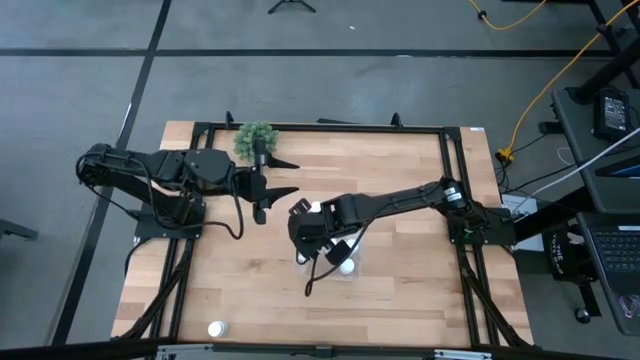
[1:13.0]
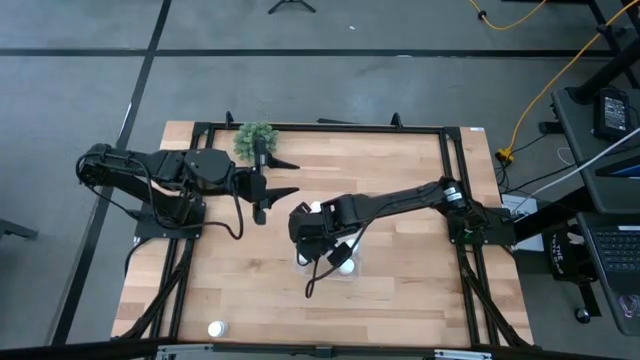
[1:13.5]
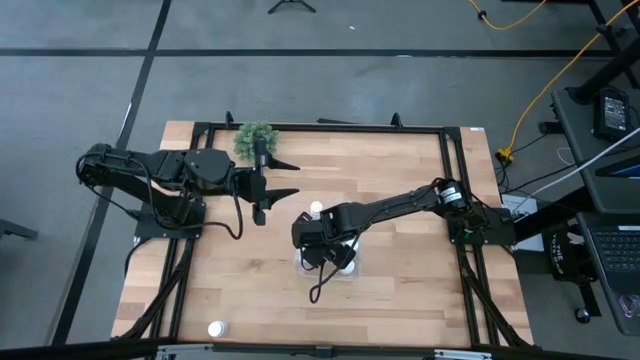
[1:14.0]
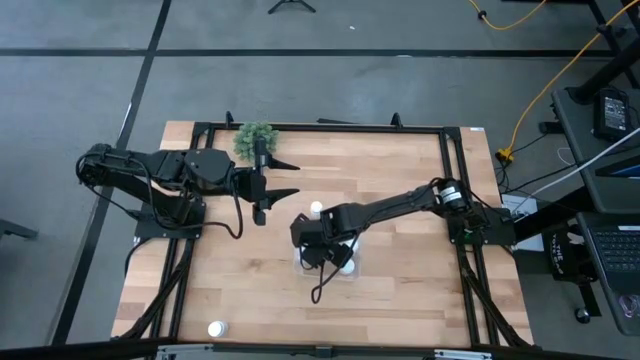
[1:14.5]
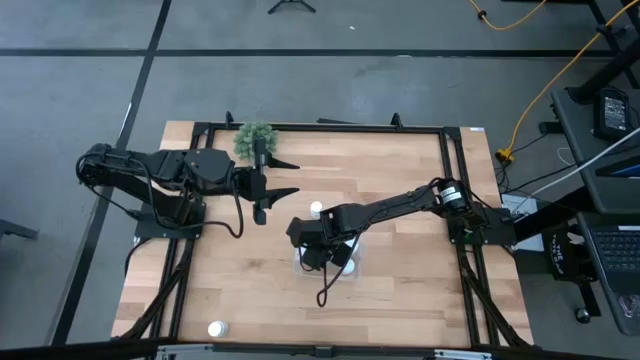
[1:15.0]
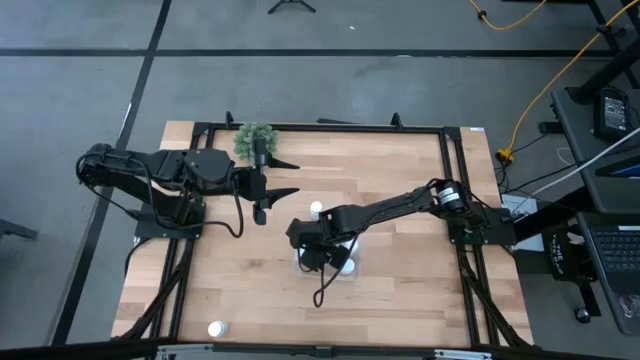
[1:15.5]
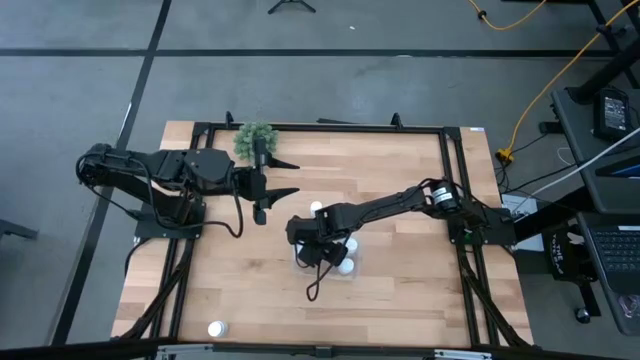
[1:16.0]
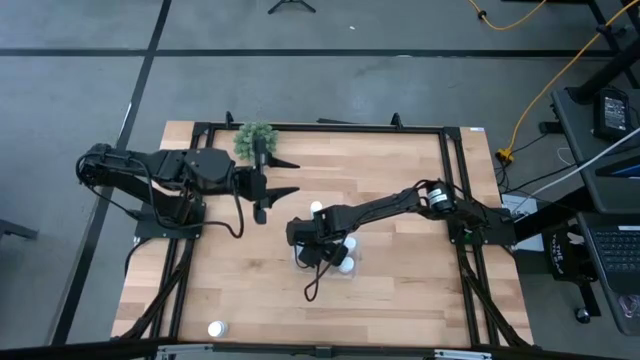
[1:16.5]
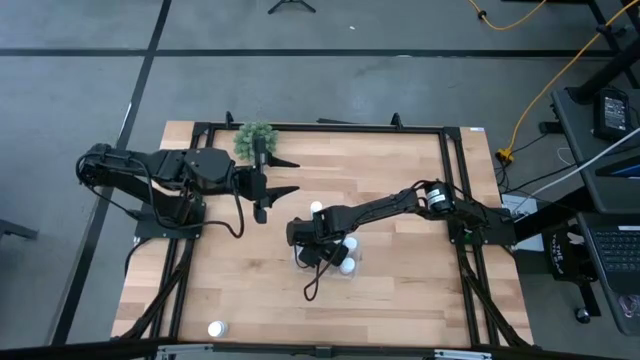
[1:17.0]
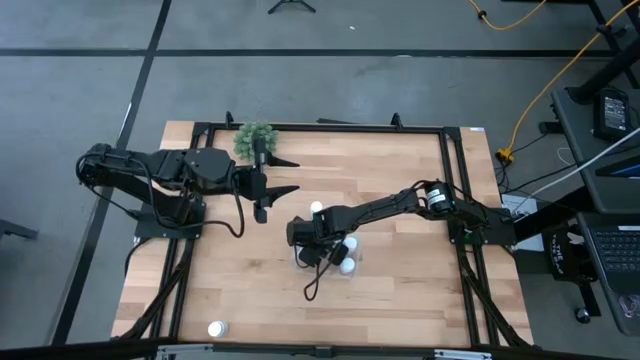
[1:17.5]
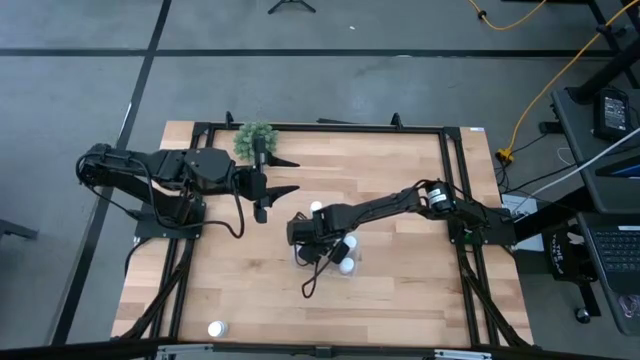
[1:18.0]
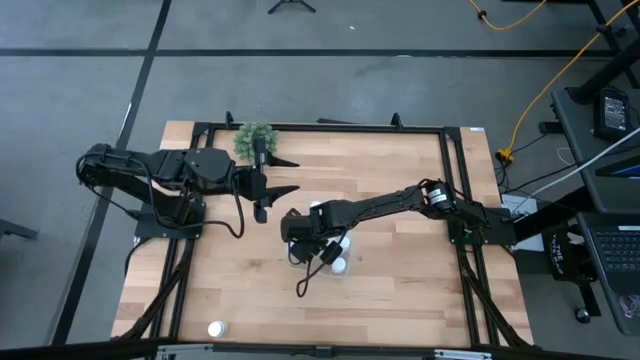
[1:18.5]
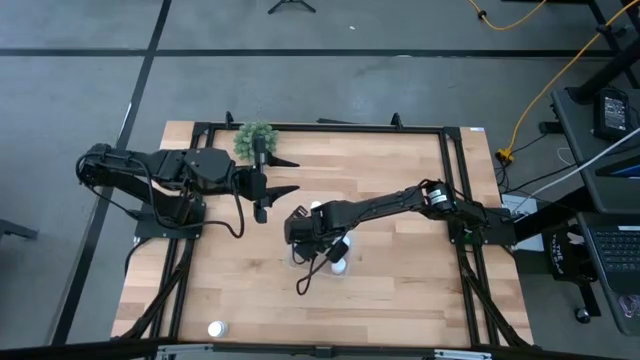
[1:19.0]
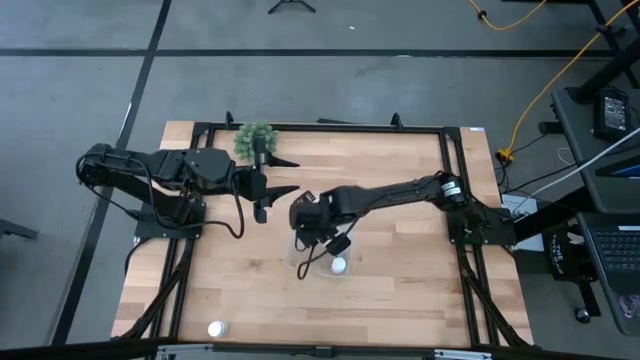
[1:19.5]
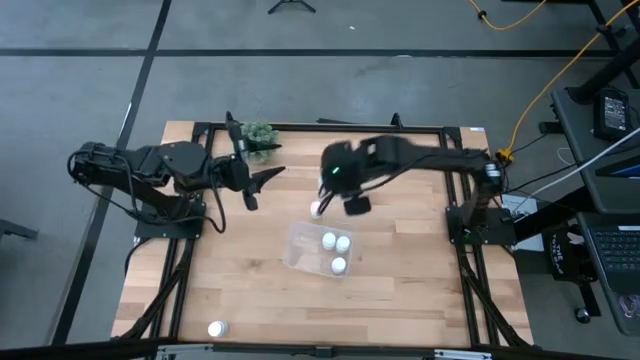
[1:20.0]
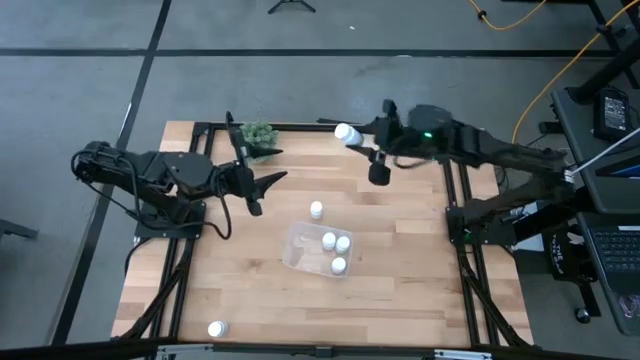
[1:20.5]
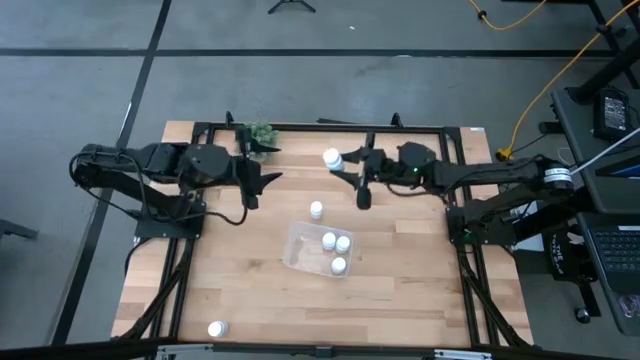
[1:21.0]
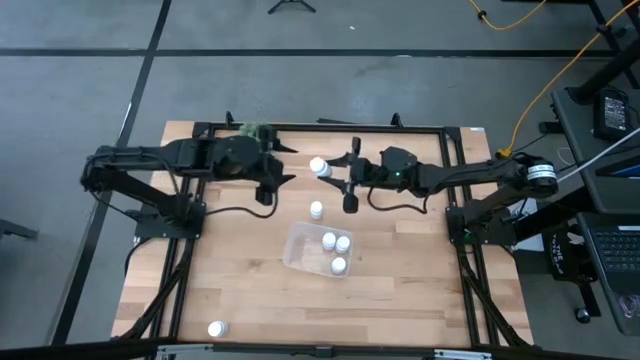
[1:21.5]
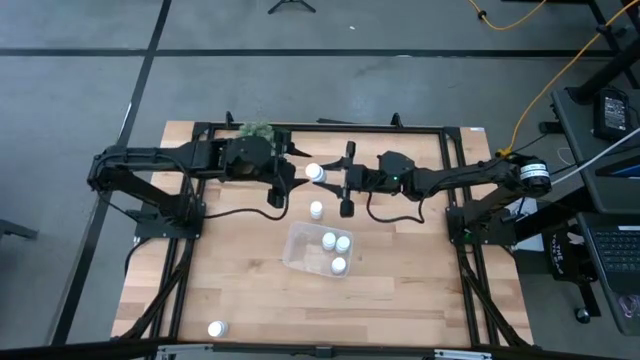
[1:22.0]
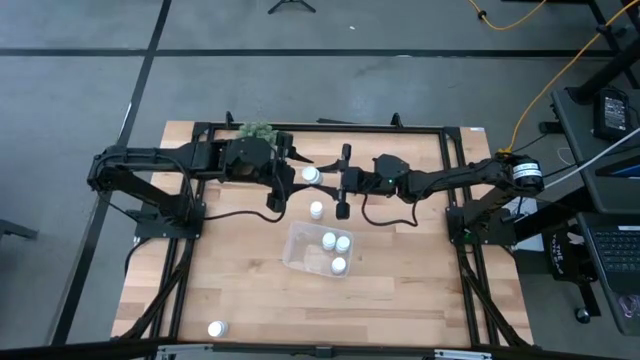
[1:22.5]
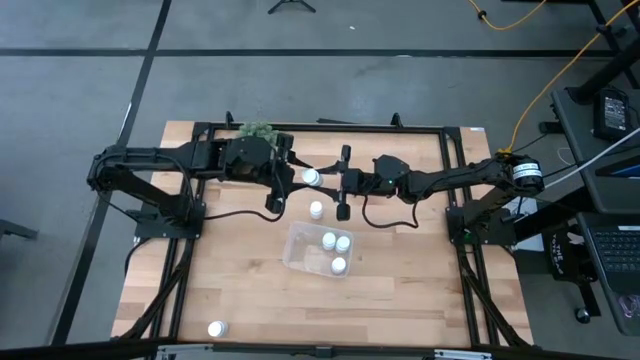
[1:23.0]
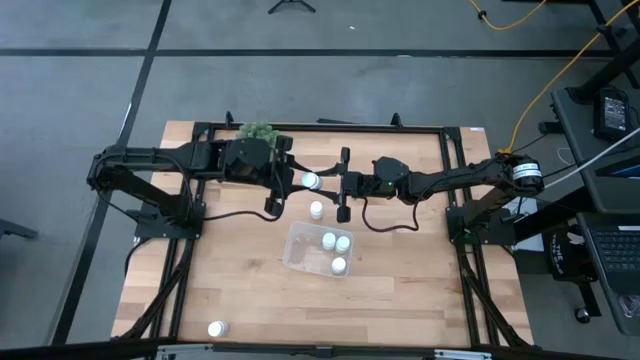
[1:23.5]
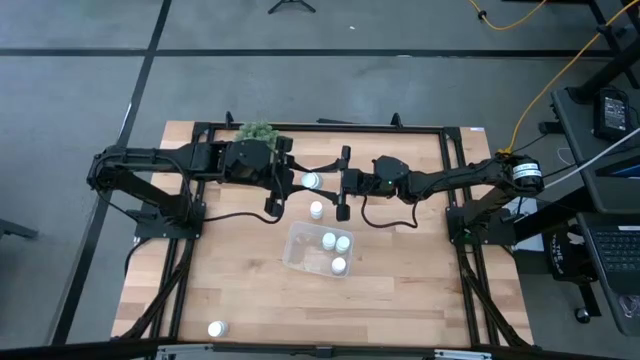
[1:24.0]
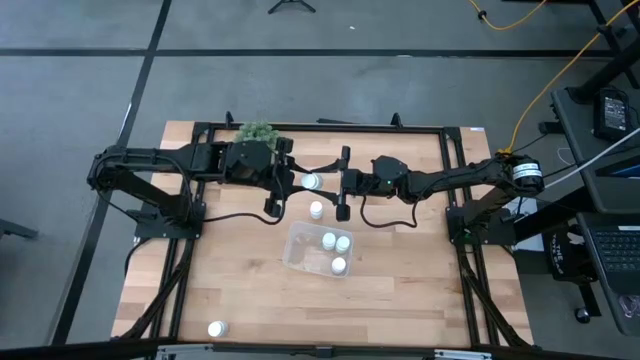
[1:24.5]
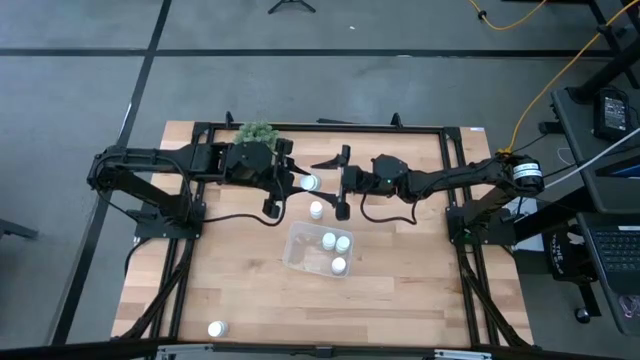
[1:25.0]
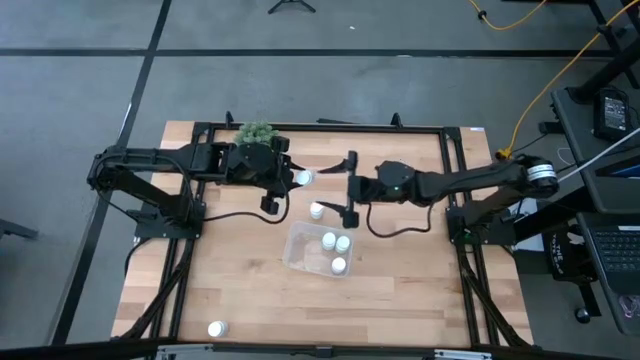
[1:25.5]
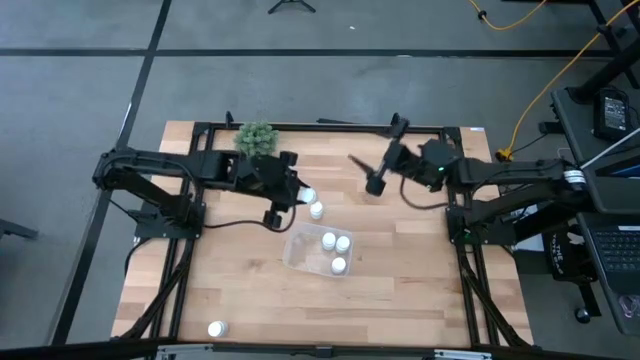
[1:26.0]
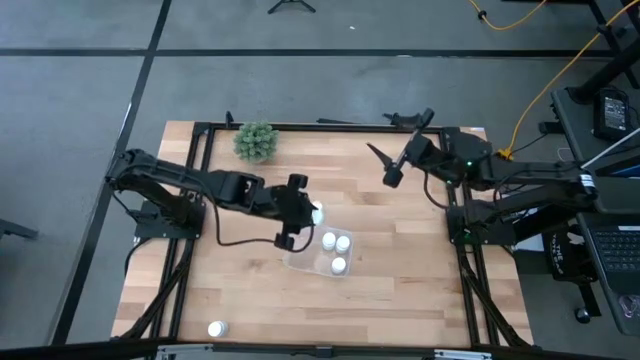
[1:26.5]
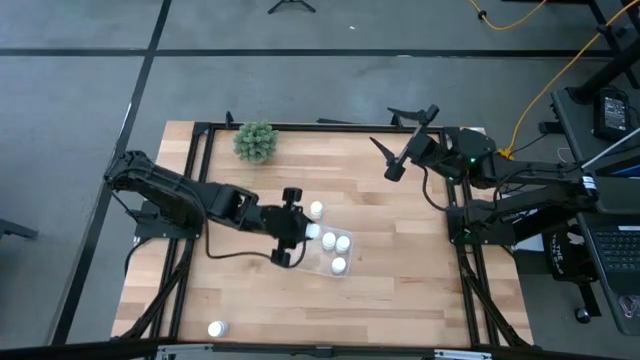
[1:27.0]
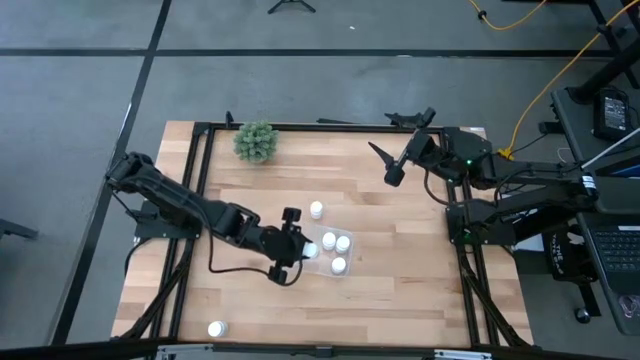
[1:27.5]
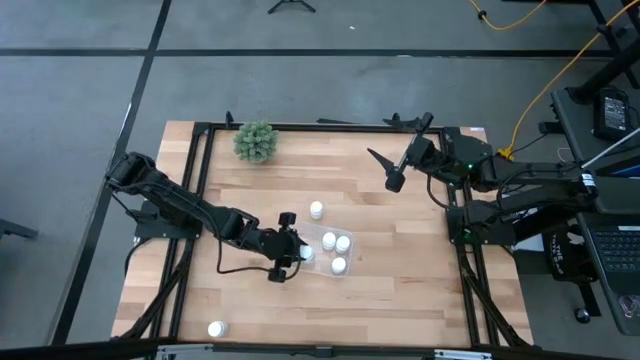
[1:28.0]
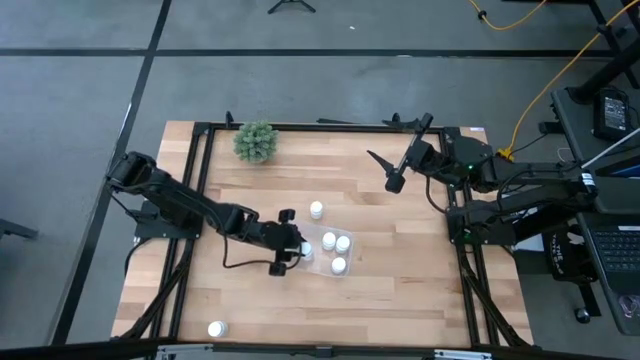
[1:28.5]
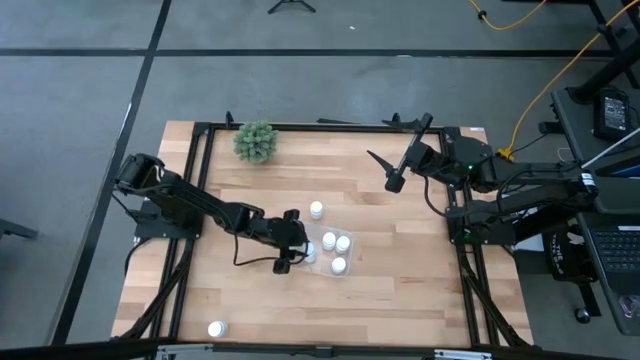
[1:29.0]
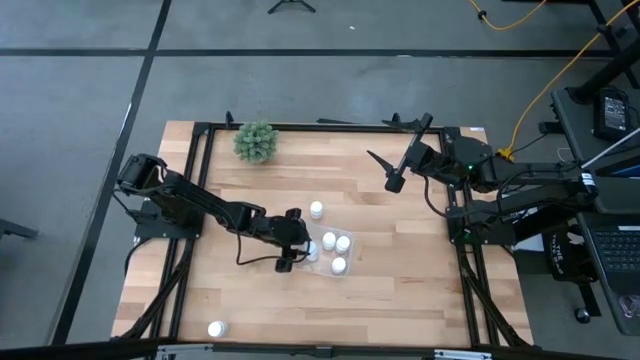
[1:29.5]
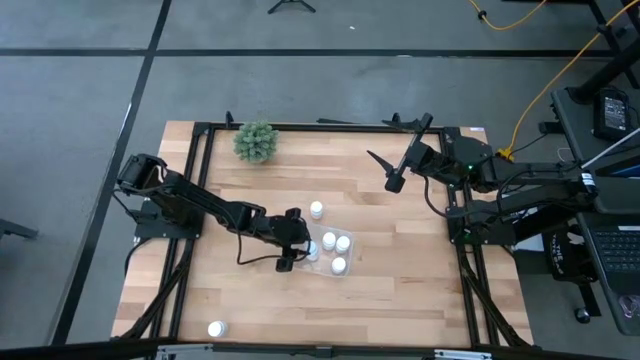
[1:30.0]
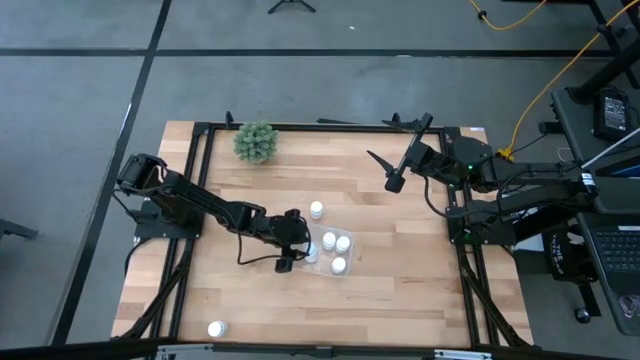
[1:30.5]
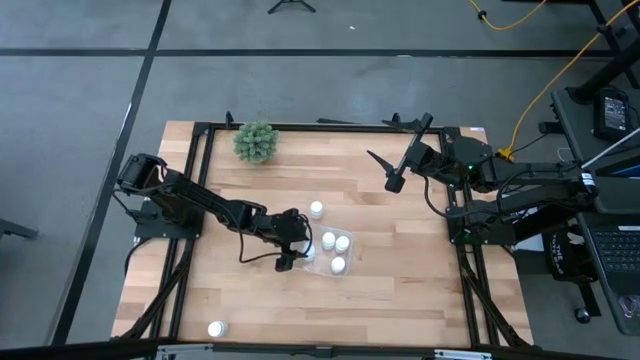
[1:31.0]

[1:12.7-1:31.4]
Task: Pick and place pill bottles into a basket
Adjust the white medicine bottle on the transparent bin
